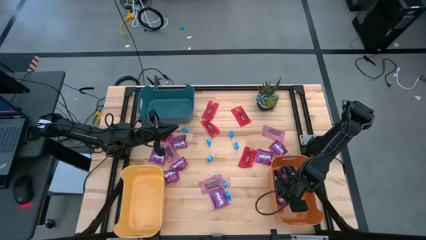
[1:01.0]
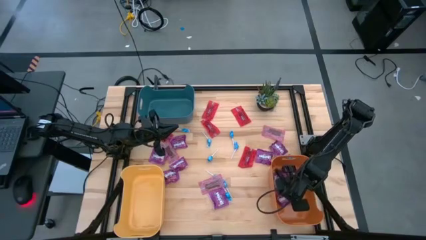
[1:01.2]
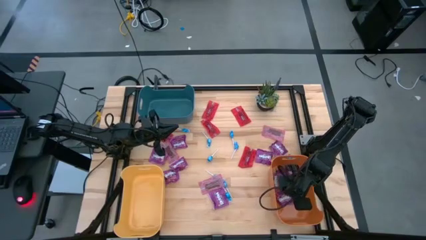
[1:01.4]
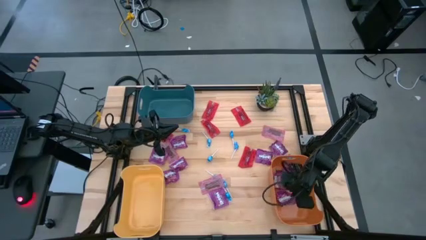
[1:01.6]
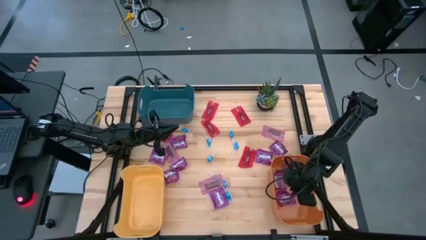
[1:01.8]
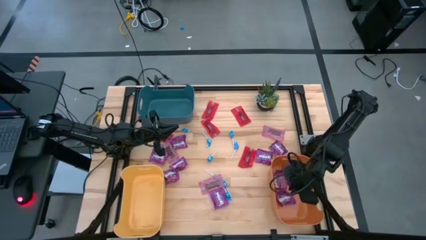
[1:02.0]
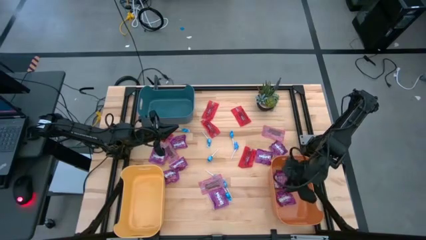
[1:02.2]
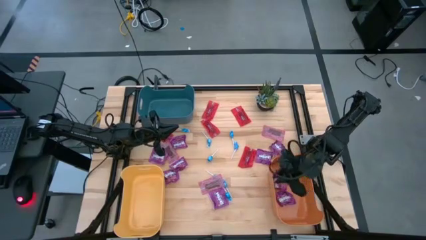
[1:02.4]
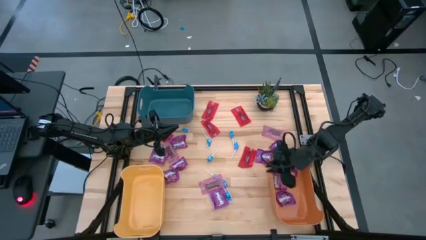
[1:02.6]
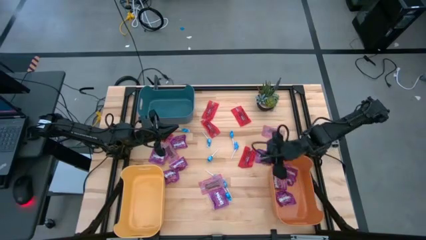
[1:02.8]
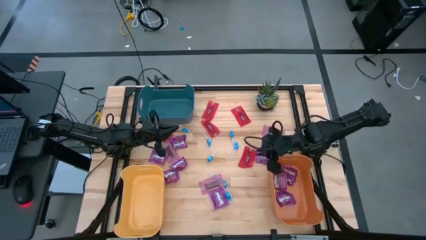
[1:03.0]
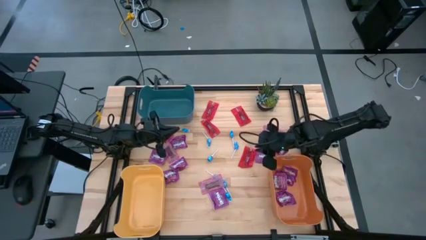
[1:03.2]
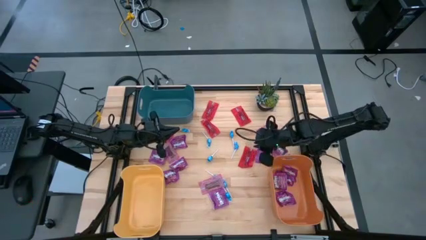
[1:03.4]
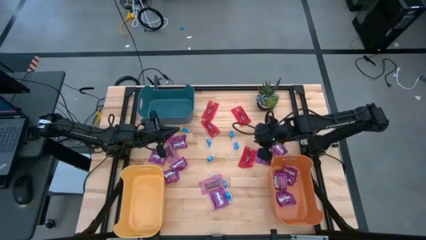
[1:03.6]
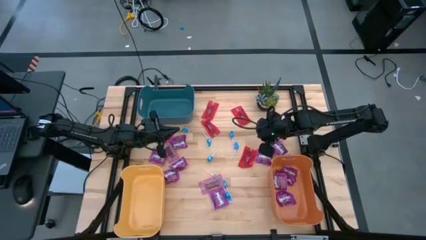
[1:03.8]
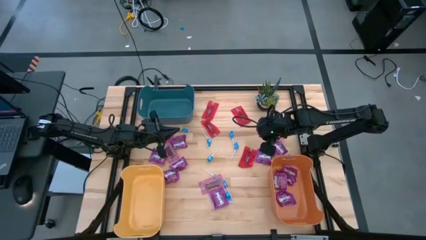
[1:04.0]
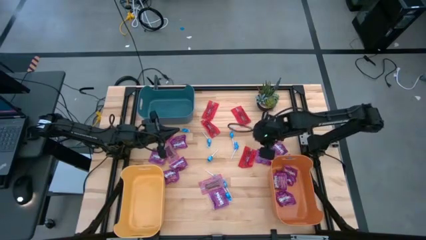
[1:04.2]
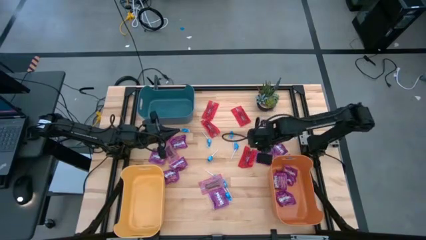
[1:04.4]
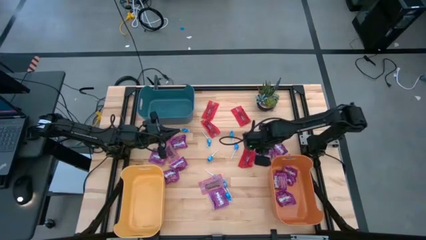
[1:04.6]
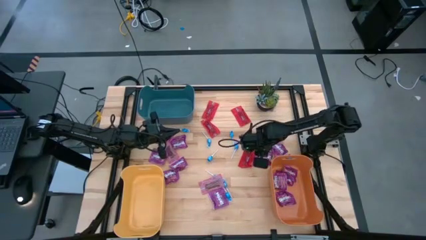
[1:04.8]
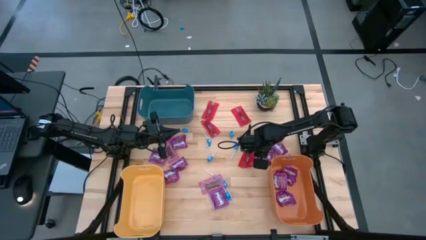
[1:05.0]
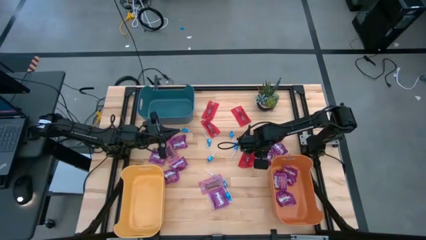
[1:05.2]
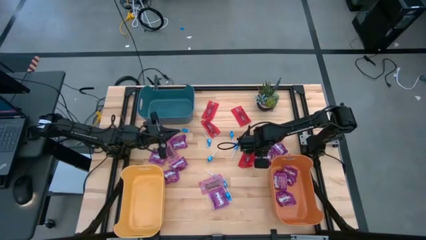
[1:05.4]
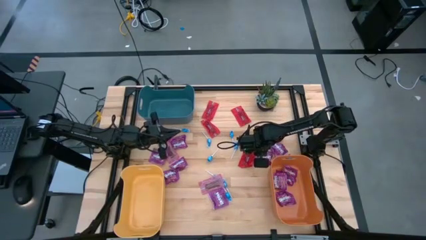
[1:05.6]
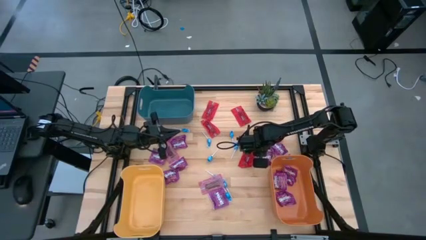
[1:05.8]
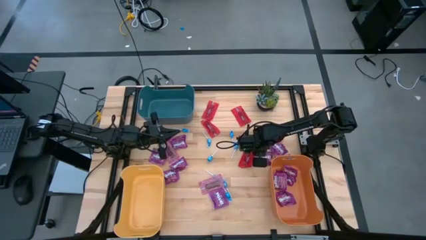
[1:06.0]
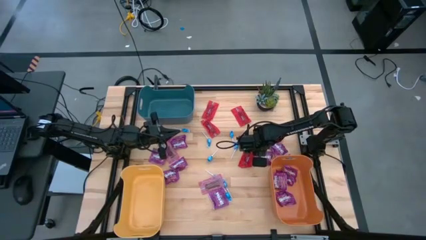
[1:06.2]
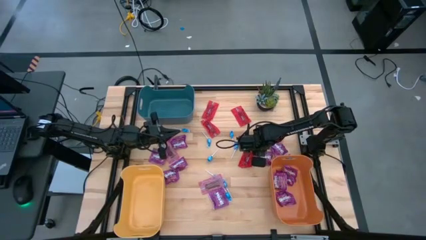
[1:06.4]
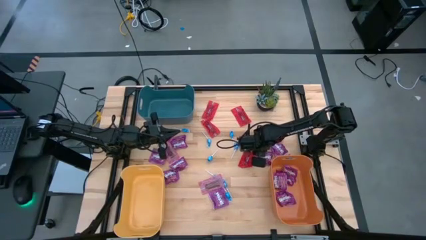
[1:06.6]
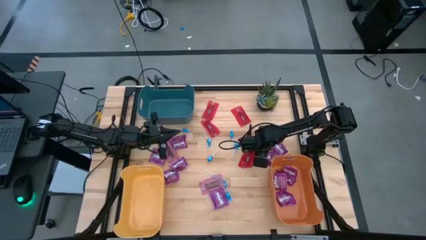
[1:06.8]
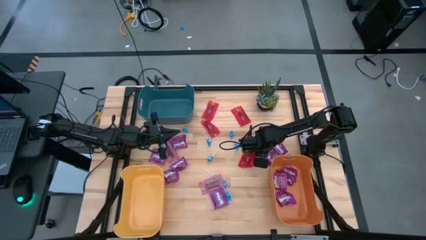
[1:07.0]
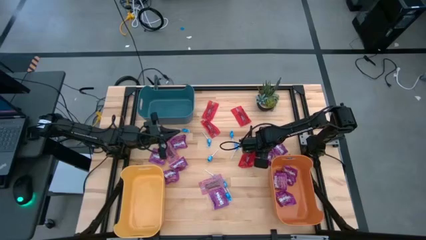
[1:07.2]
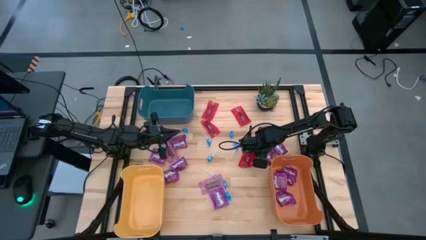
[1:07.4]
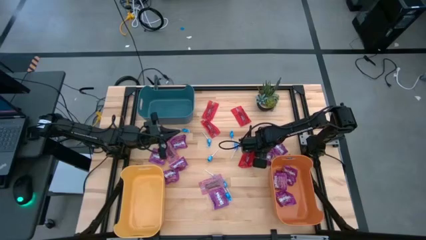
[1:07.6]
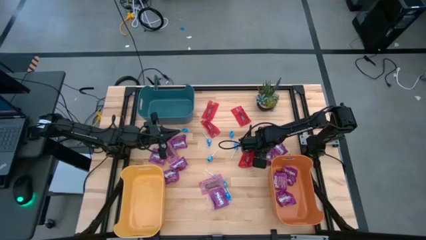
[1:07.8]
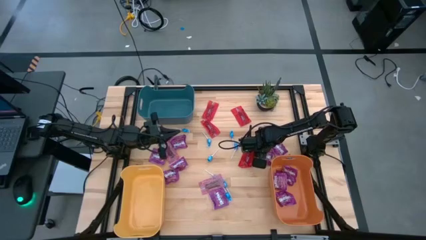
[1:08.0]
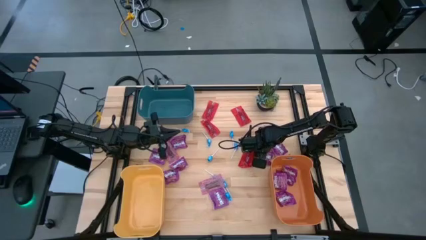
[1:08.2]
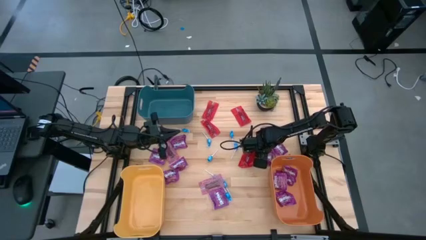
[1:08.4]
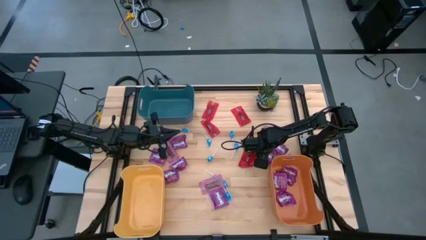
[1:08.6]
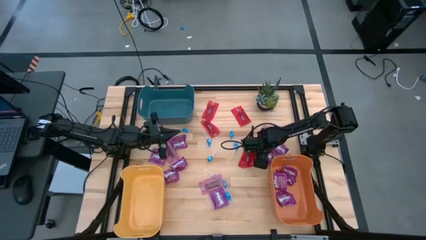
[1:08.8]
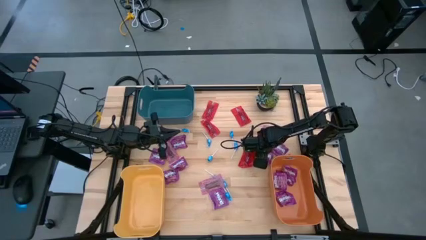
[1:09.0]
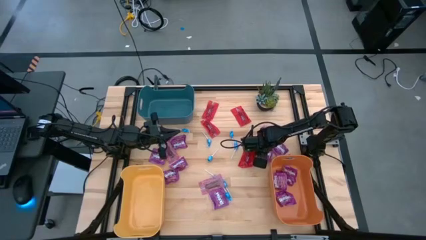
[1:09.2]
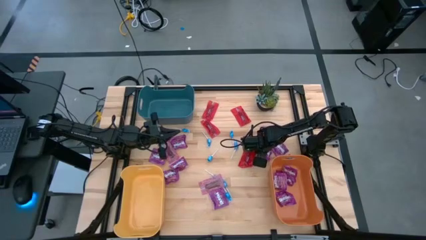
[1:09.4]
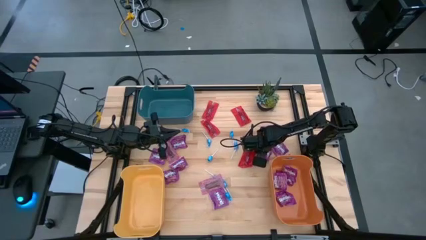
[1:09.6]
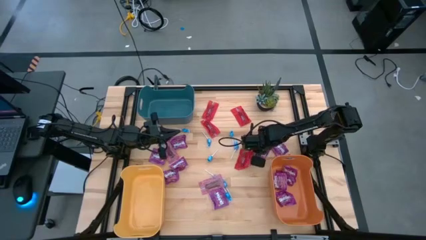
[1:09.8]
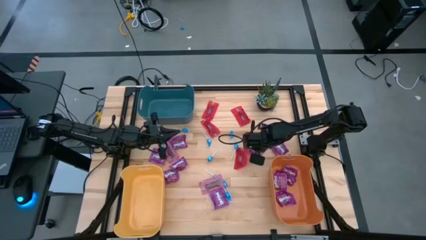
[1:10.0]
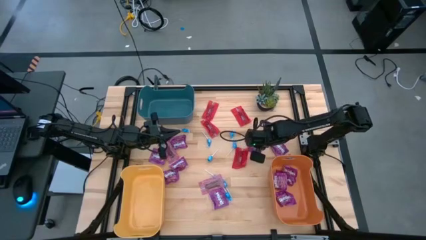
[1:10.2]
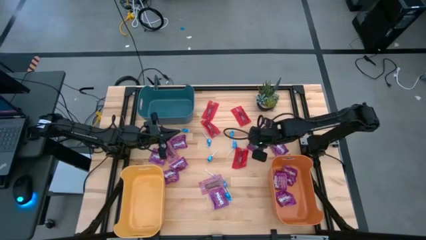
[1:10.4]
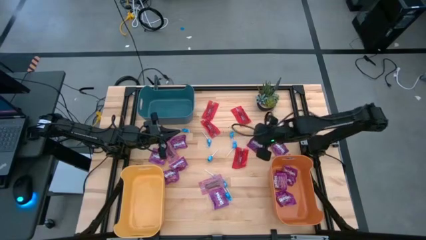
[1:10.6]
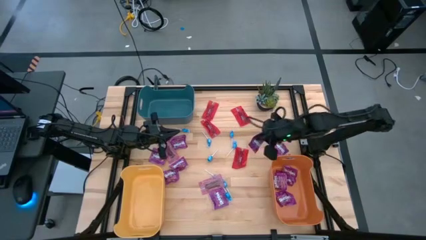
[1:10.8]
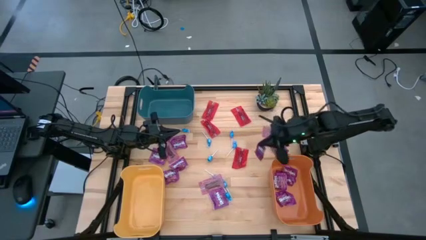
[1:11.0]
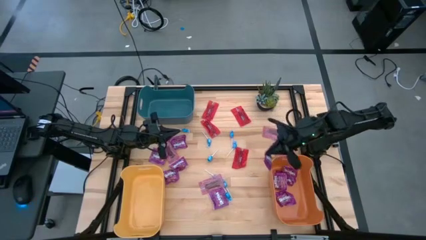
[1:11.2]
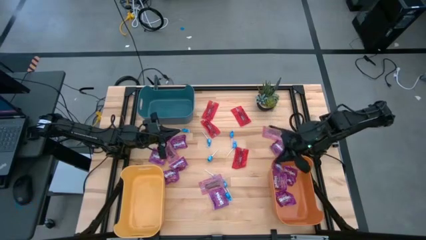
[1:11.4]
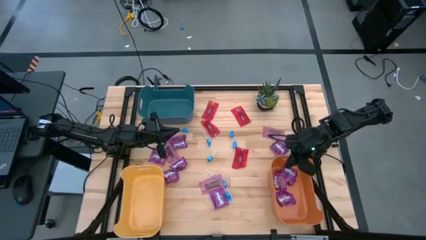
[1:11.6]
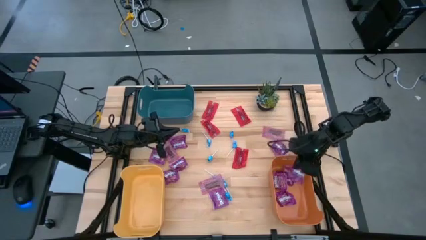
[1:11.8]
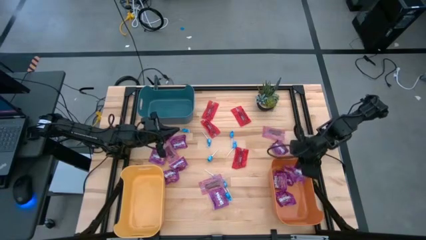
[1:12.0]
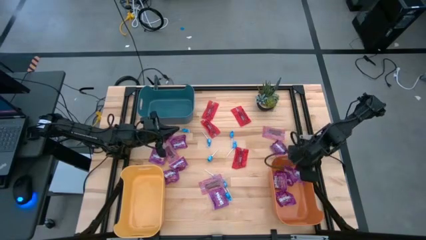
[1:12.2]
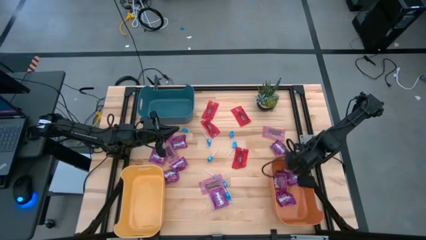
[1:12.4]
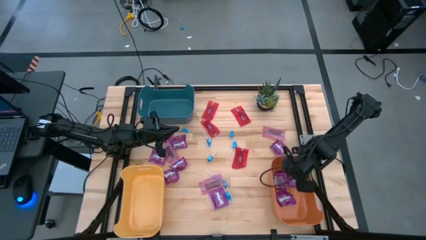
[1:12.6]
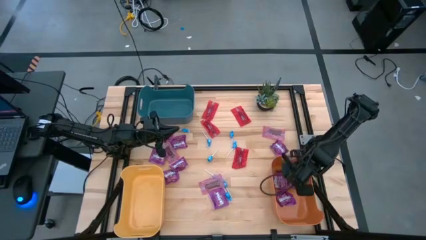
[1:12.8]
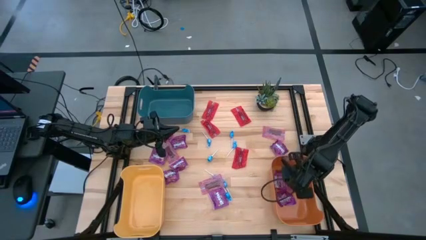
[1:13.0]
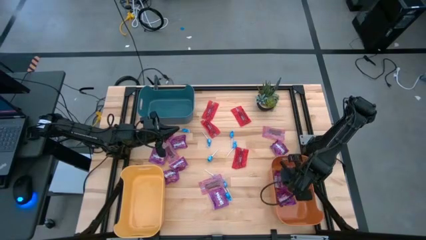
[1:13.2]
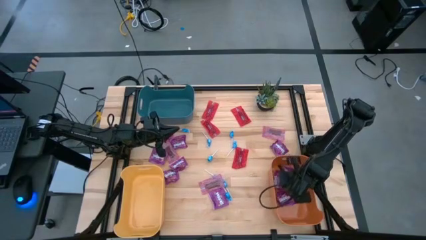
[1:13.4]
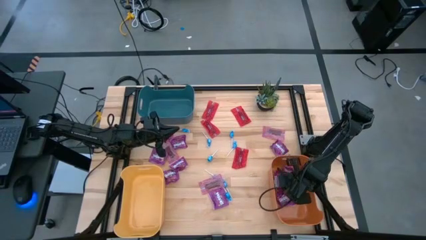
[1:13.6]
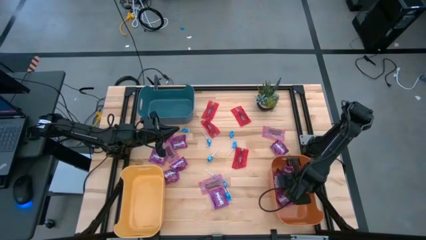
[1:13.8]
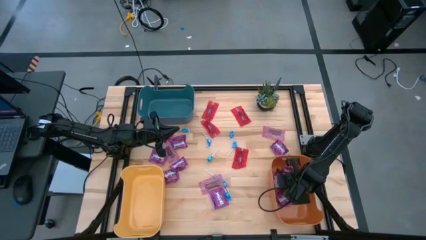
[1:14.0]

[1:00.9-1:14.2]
Task: Sort candy
Put the purple candy into the orange bin

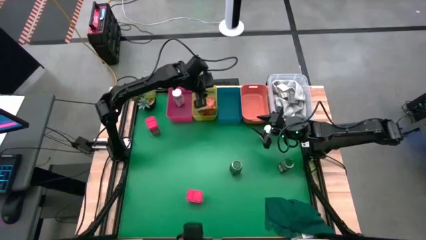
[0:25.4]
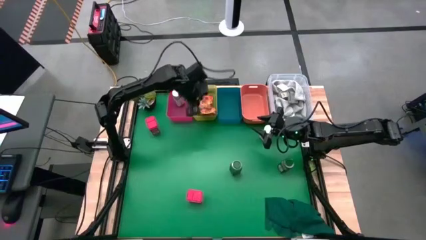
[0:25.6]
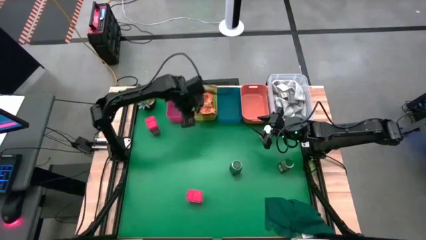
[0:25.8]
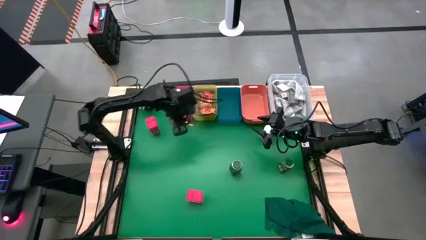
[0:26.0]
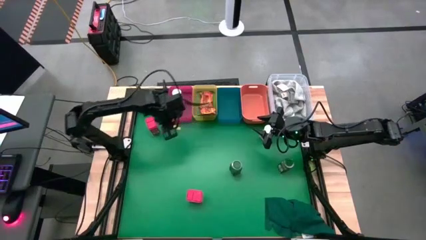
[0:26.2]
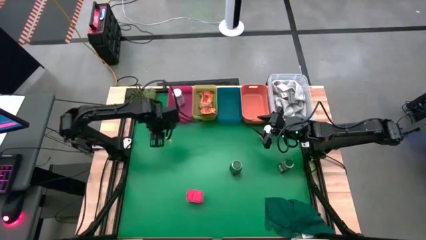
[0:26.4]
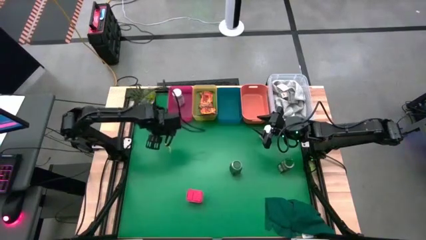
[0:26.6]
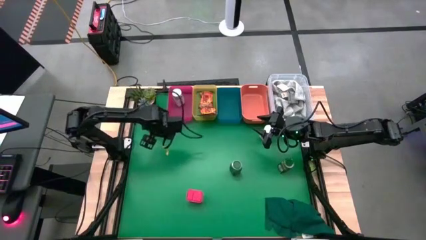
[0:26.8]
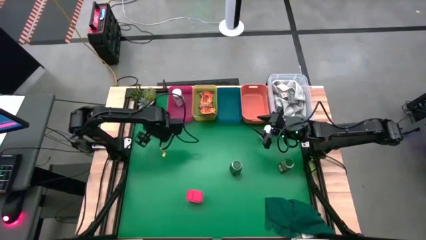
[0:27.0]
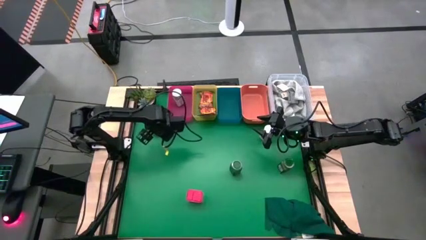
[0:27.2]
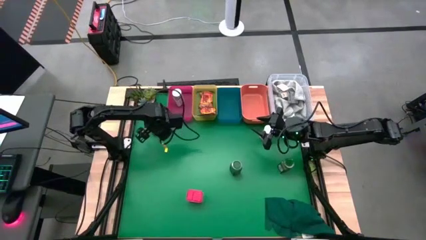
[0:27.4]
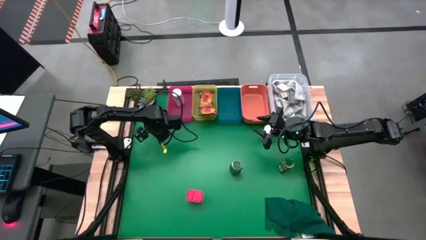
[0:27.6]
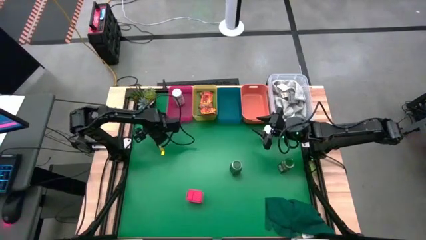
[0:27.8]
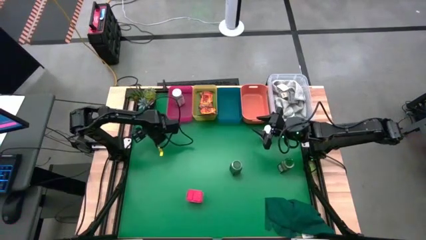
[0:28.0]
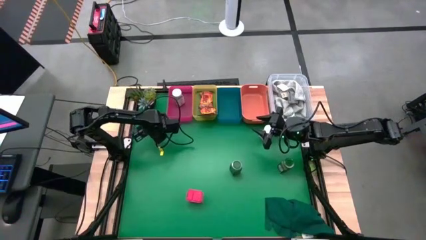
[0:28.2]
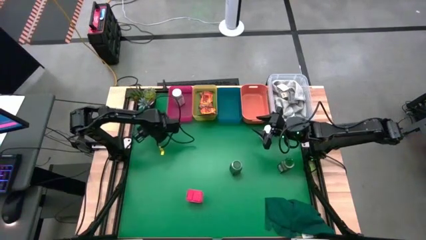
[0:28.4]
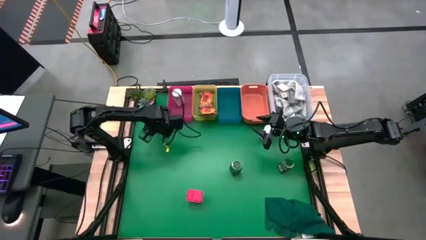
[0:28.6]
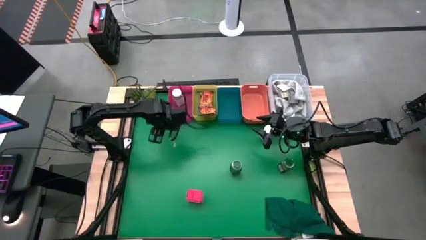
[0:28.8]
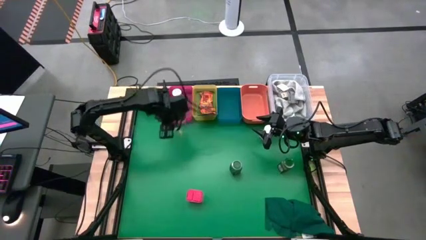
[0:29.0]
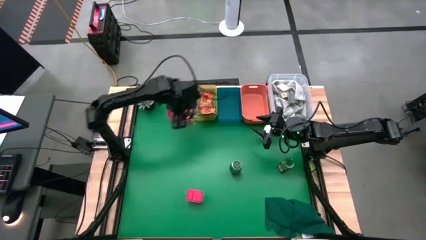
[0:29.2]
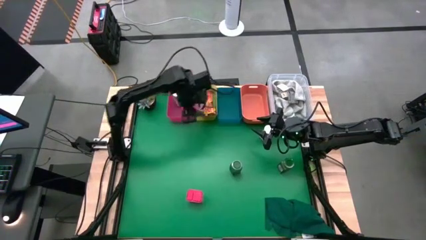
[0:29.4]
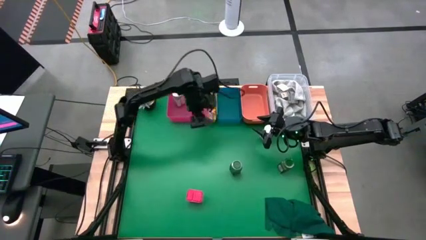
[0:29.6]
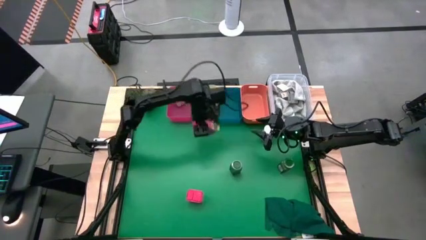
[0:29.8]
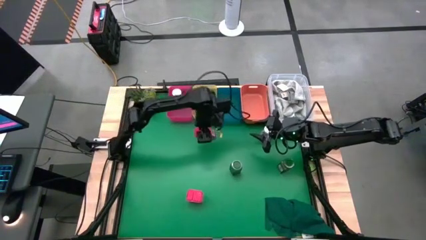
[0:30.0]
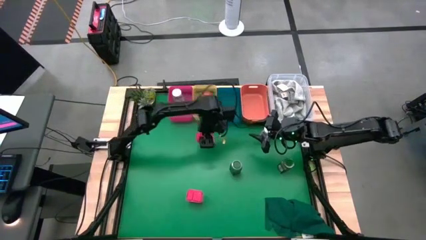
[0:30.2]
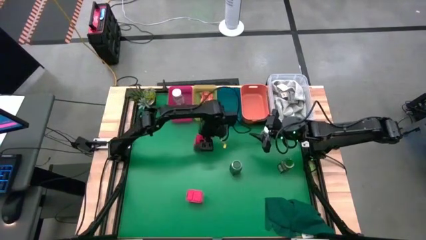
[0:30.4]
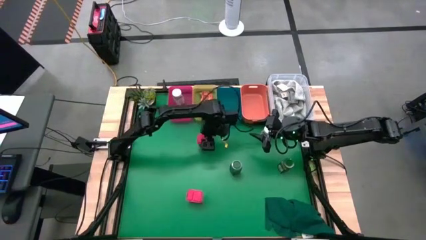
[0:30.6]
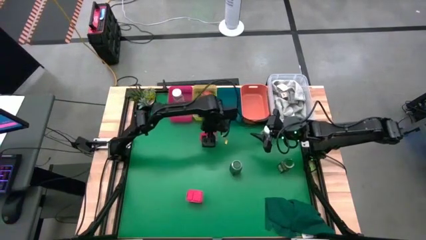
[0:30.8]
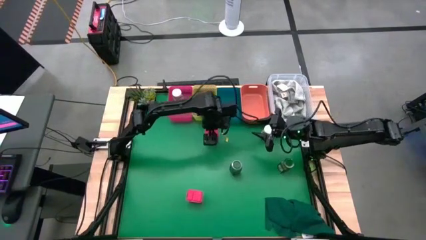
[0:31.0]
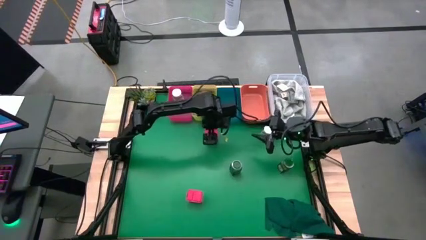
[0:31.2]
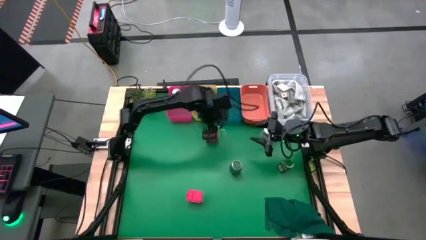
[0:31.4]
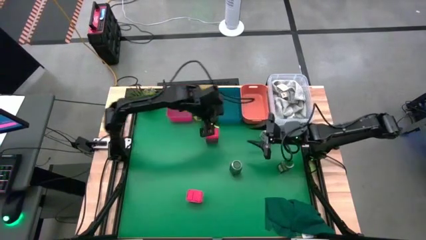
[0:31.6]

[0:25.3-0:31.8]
Task: Sort spices by type
Move the top red seasoning can to the center
